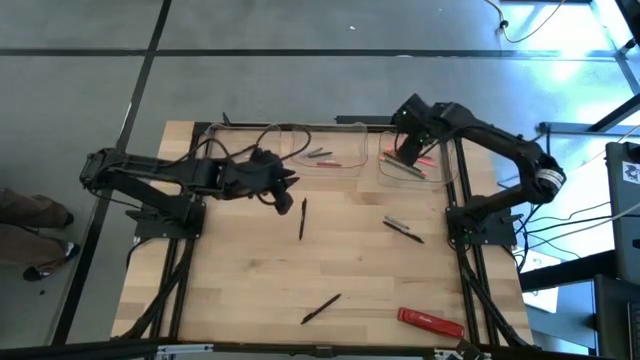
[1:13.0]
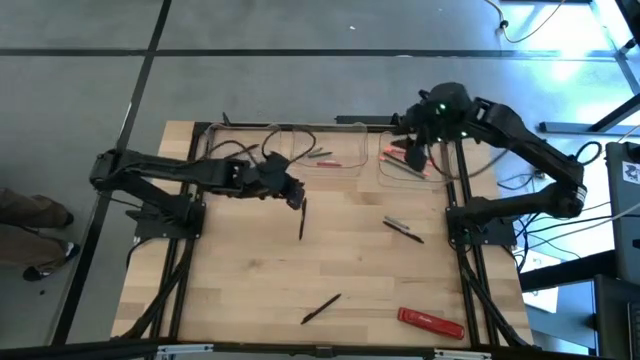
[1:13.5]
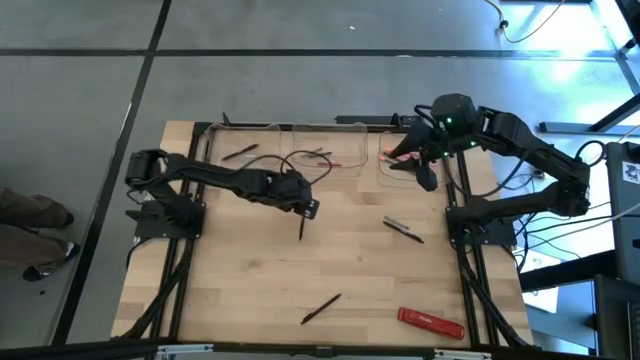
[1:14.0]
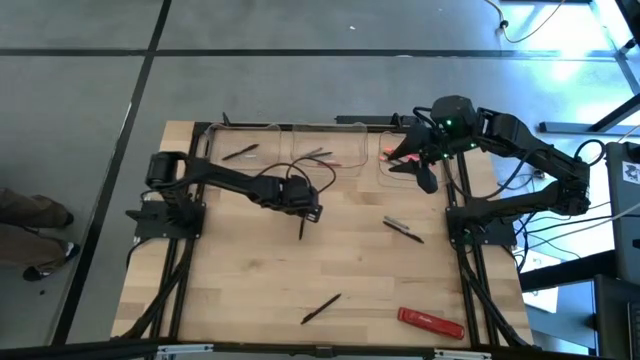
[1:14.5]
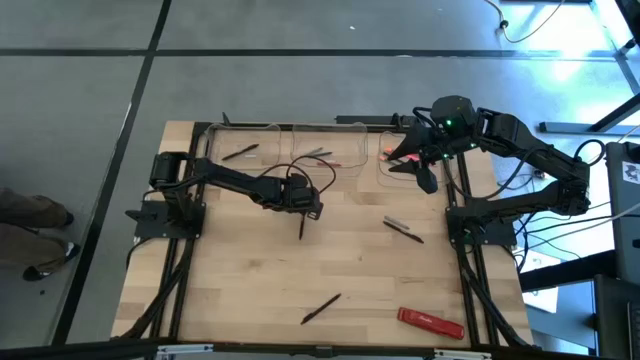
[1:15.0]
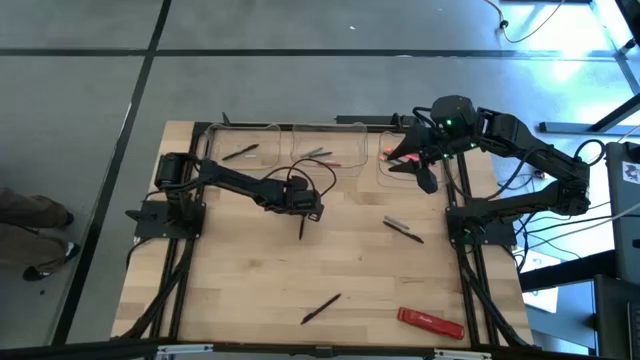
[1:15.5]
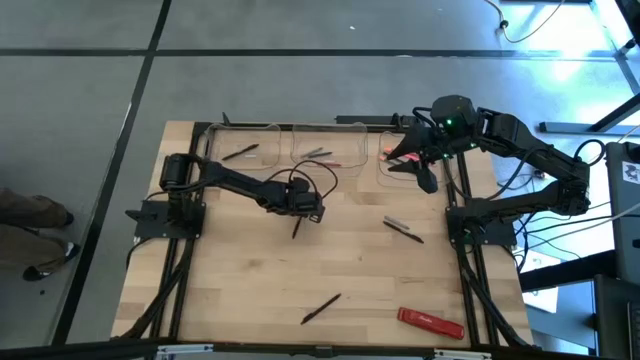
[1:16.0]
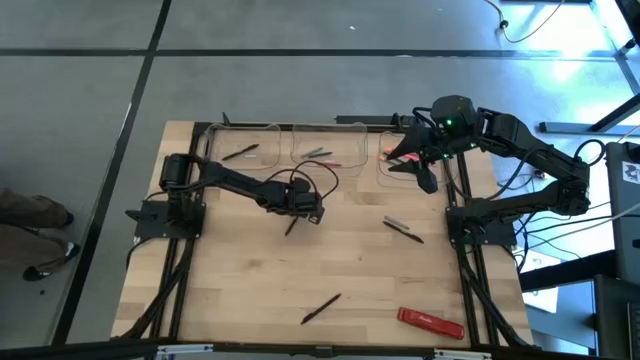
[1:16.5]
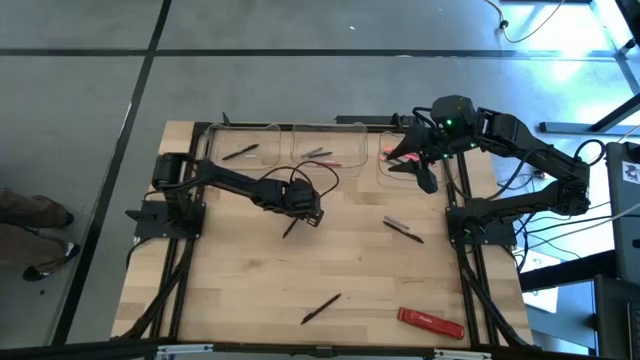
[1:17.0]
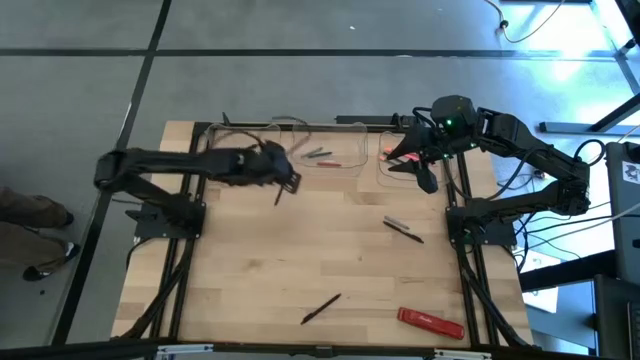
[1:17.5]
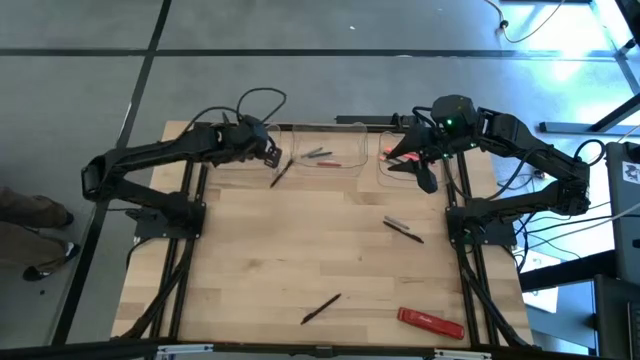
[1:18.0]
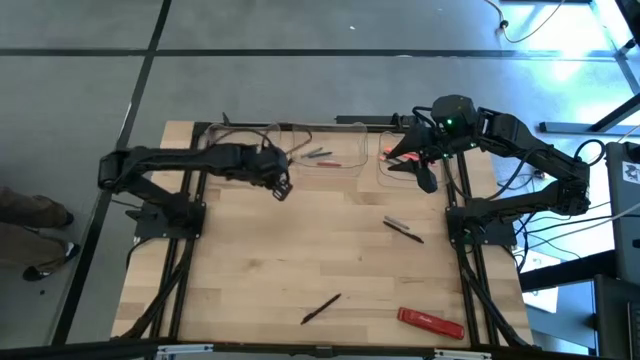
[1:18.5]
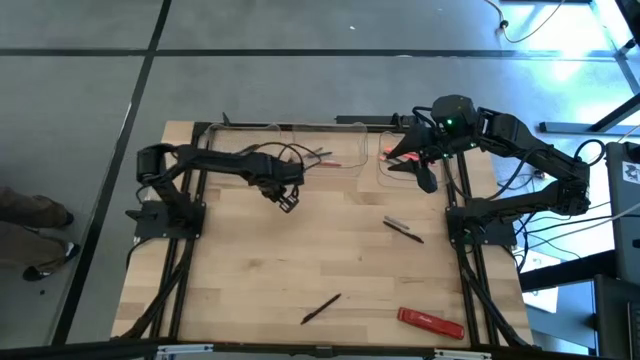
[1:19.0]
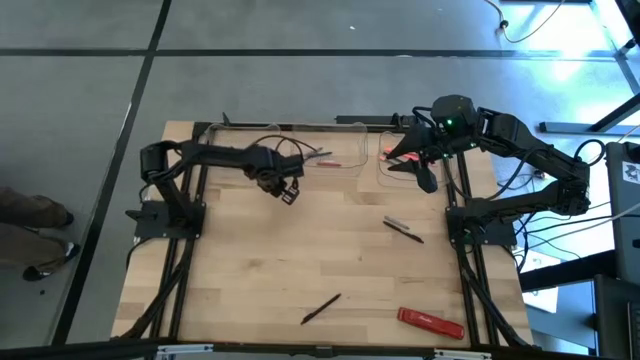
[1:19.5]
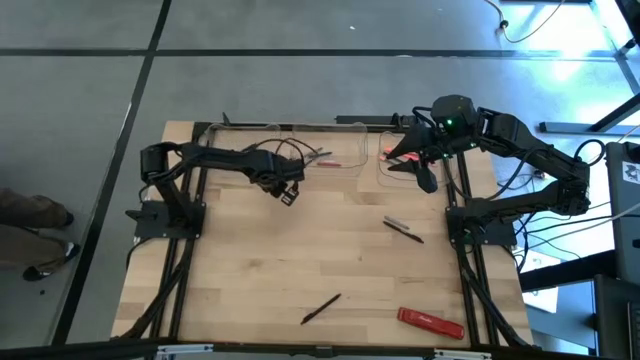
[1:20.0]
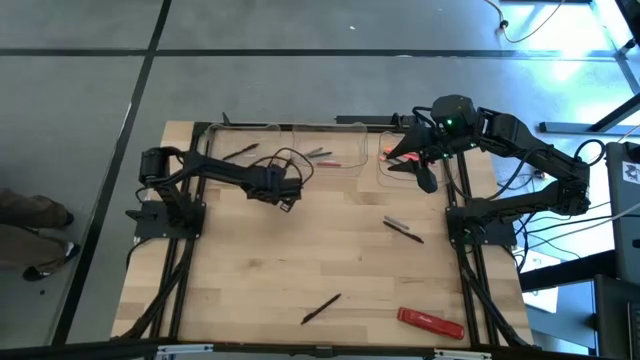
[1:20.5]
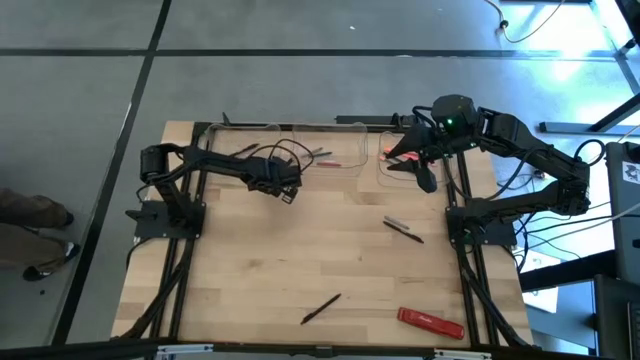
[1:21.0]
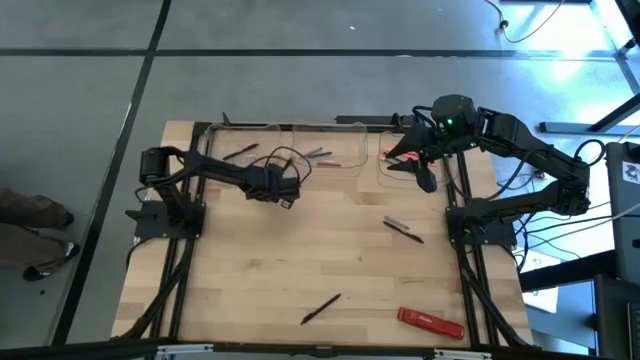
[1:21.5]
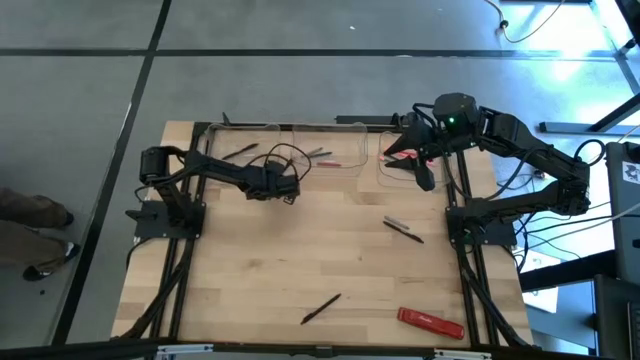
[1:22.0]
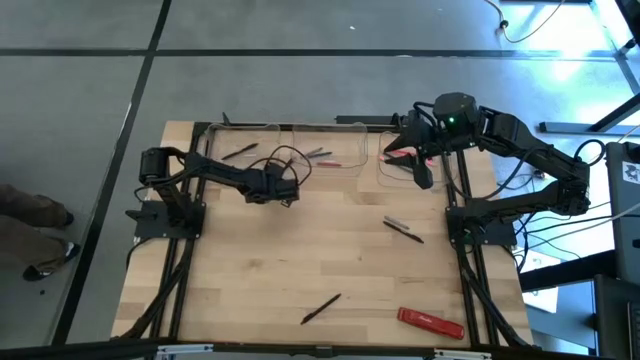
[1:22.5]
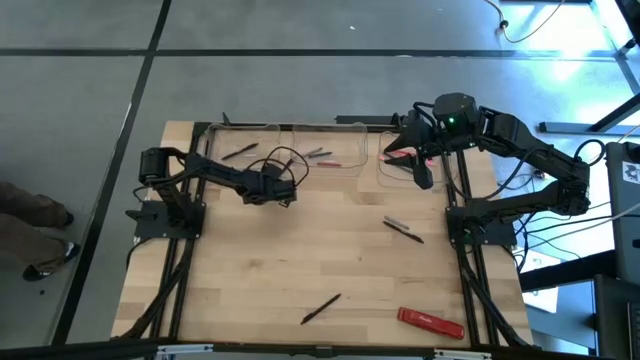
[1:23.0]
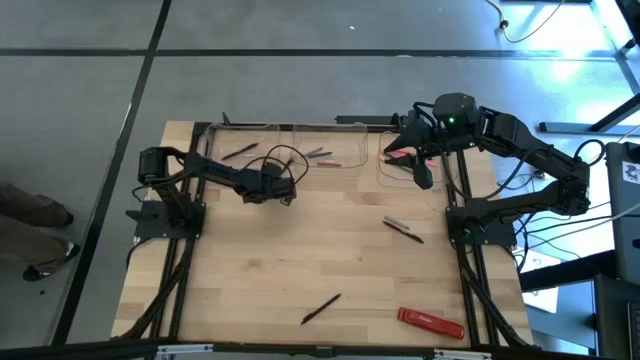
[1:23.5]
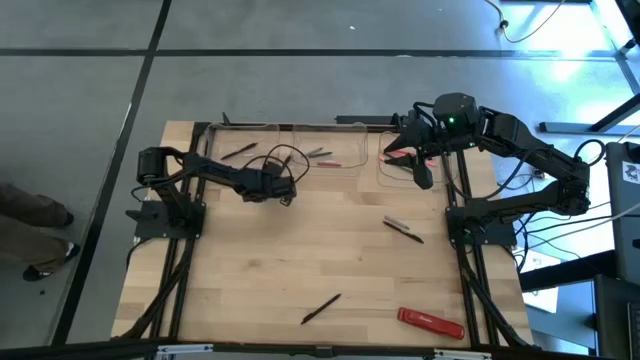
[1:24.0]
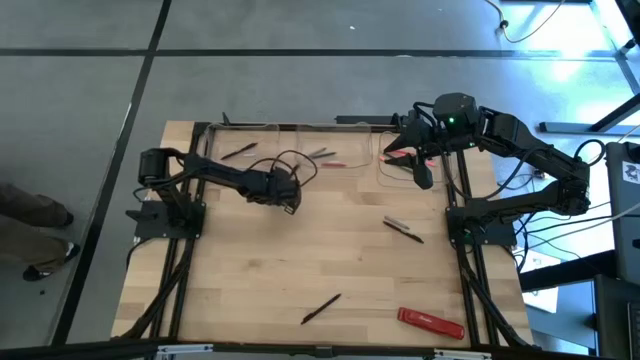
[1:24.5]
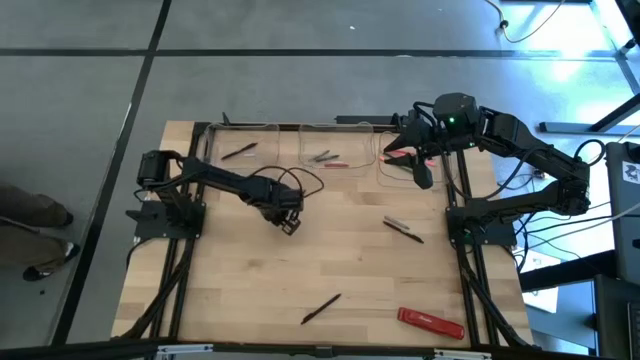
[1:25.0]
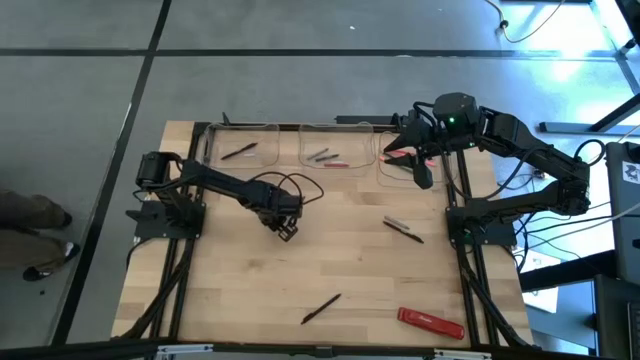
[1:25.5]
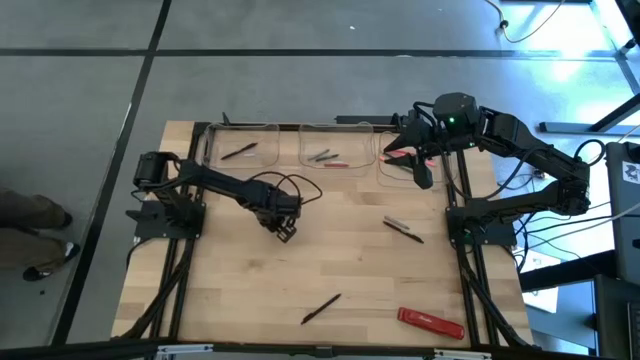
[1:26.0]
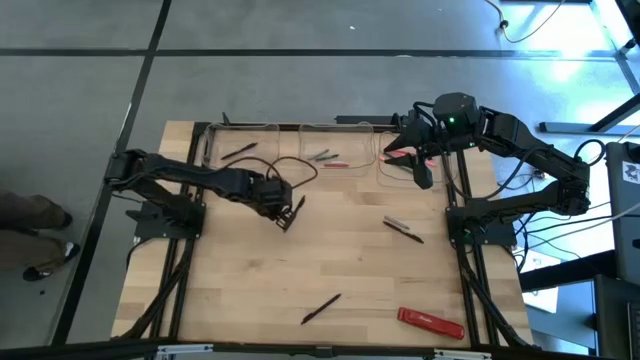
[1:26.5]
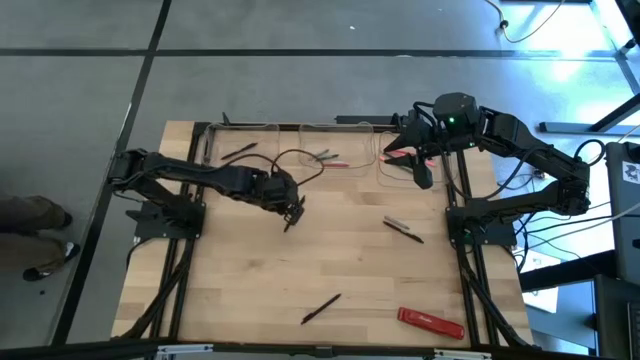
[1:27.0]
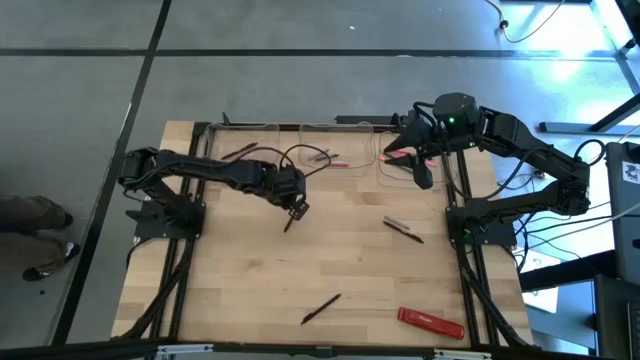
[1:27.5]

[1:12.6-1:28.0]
Task: Sort crayons/erasers/pens/pencils in bins
Put the black pen into the left transparent bin

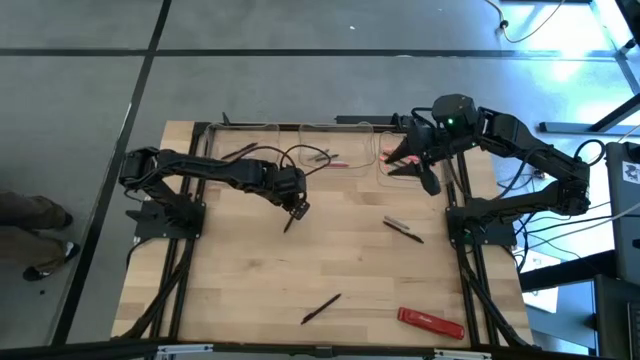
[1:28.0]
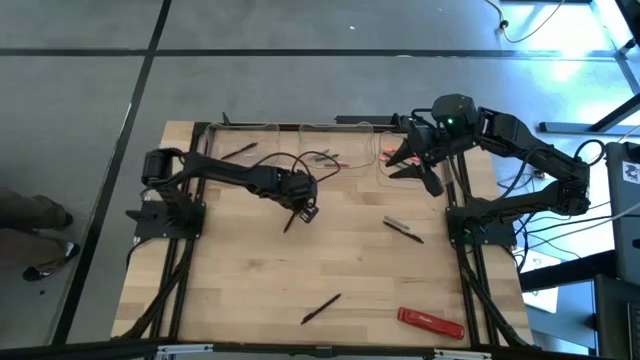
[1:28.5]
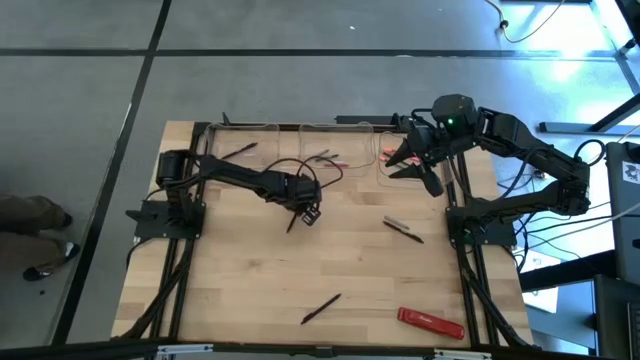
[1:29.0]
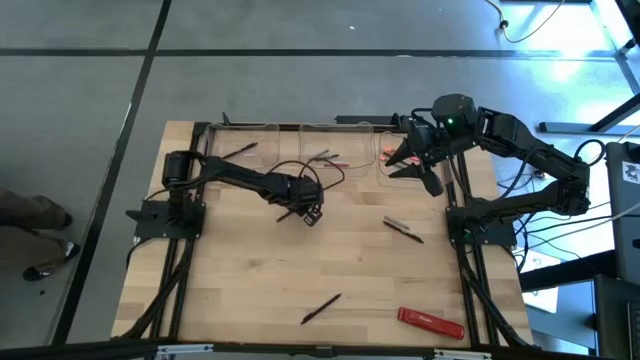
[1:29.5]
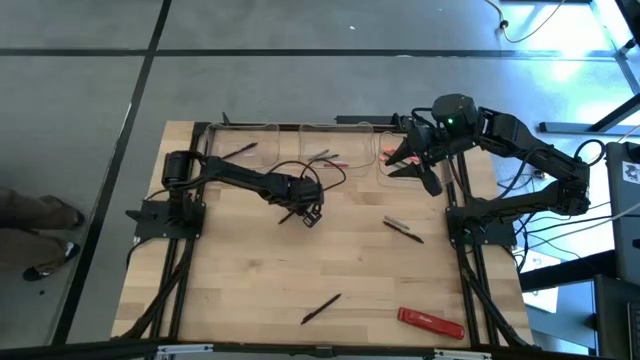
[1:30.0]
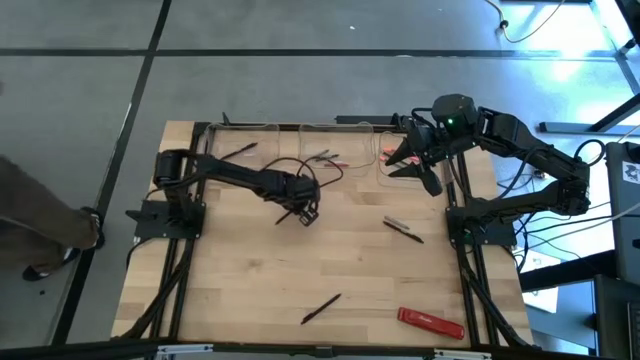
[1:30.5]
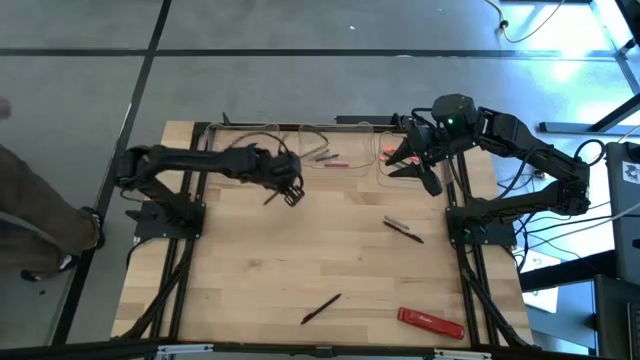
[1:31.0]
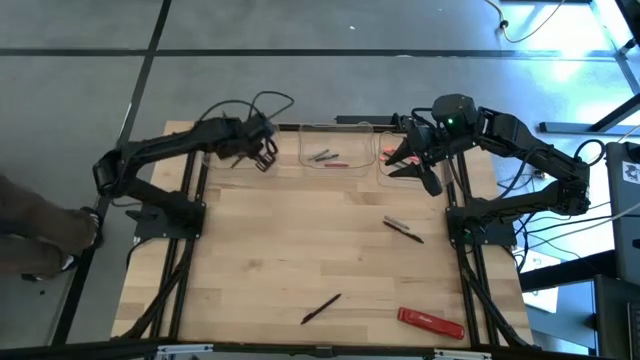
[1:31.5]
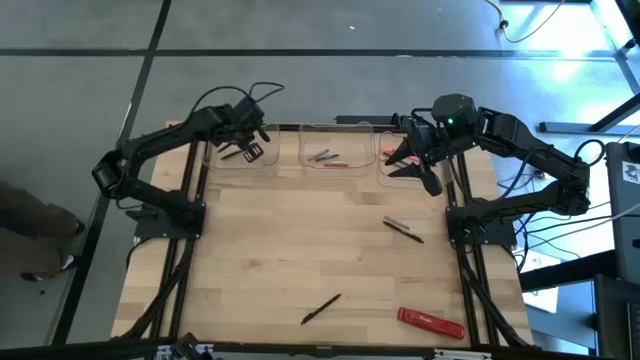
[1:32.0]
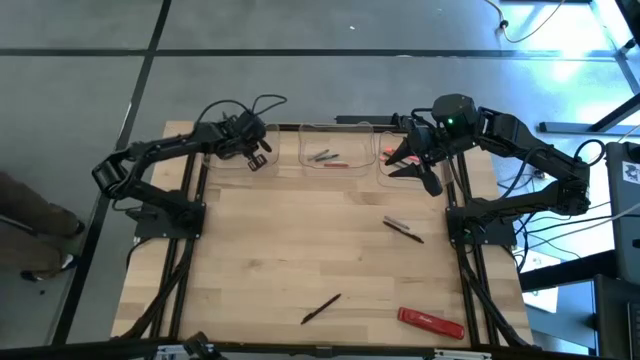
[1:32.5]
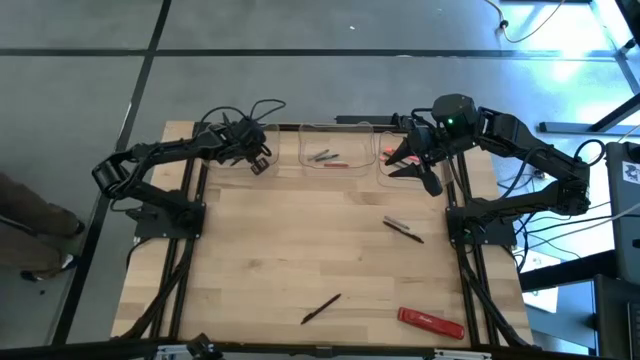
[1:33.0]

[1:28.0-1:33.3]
Put the black pen into the left transparent bin

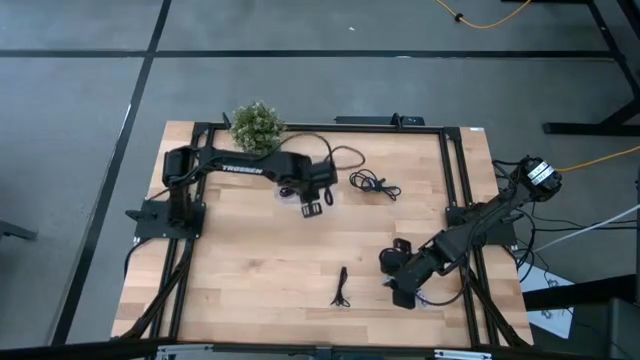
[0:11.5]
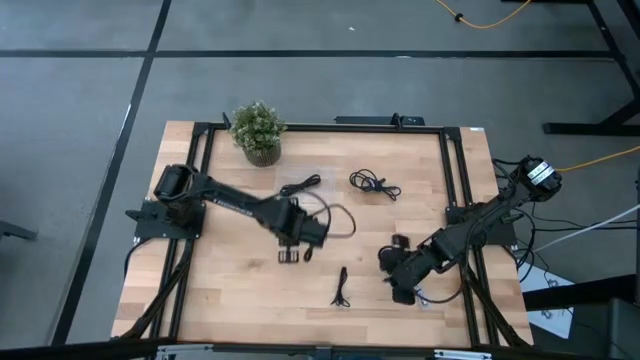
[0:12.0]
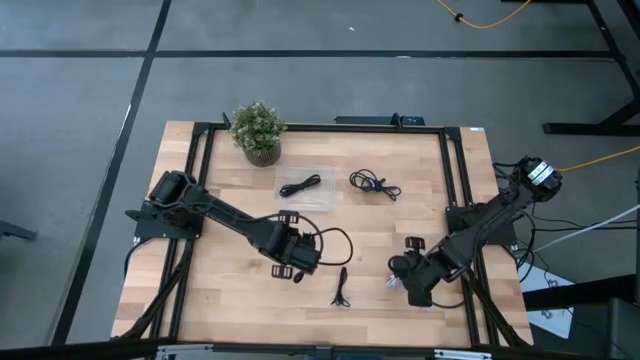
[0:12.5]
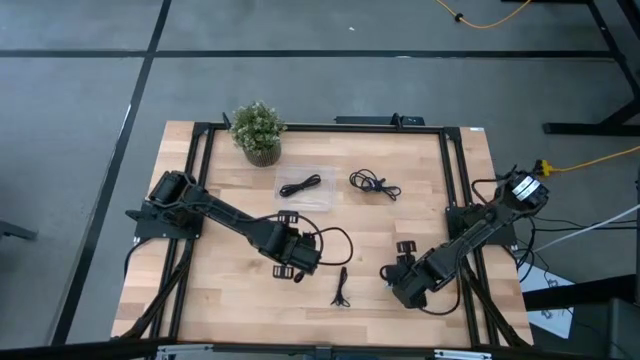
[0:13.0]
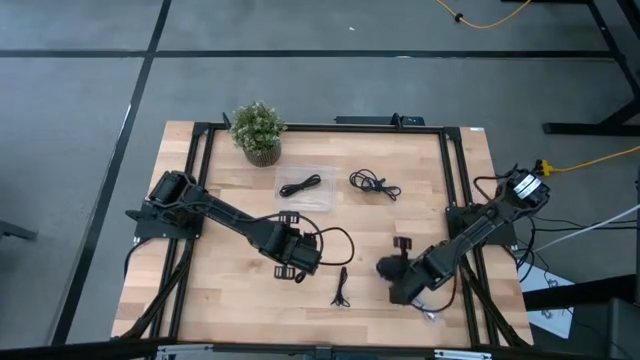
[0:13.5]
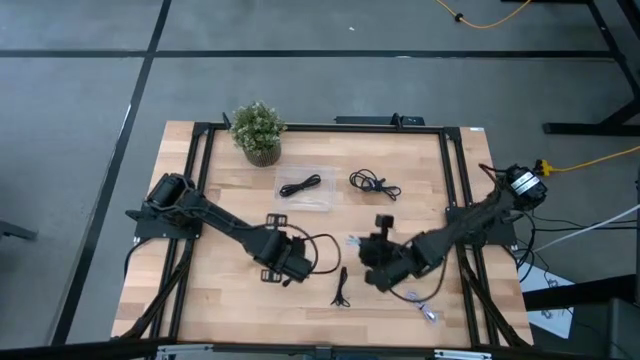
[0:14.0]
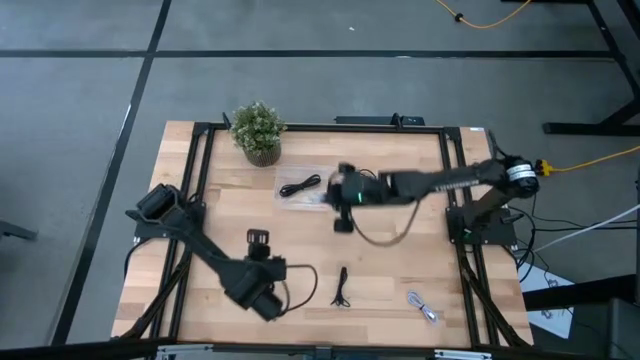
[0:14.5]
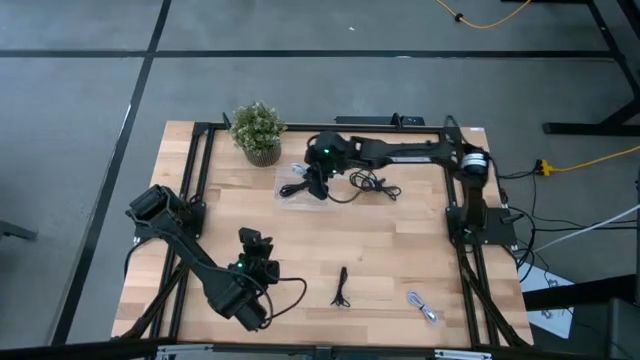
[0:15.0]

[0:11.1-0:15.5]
Task: Pick and place USB-C Cables
Put the top white charger cable into the transparent bin
